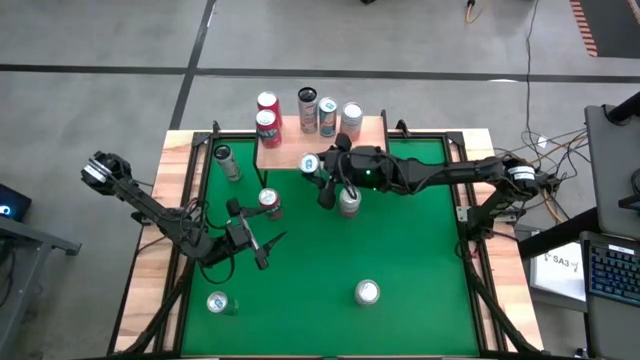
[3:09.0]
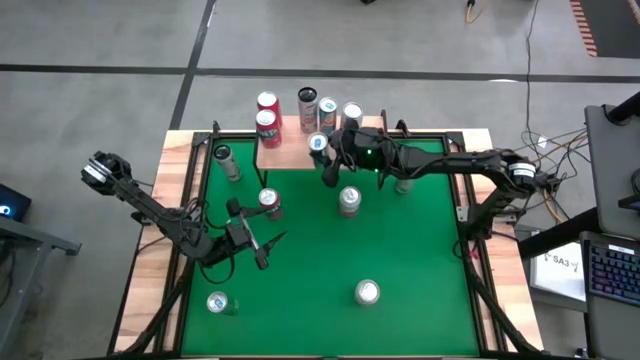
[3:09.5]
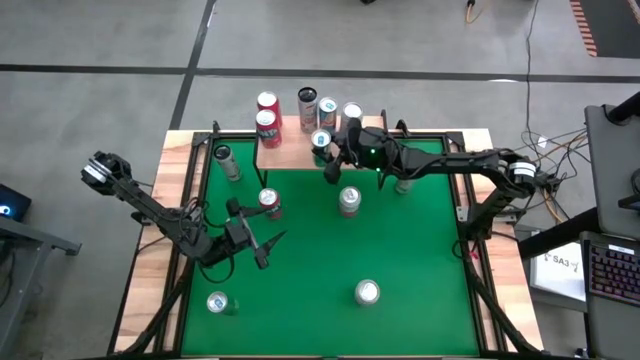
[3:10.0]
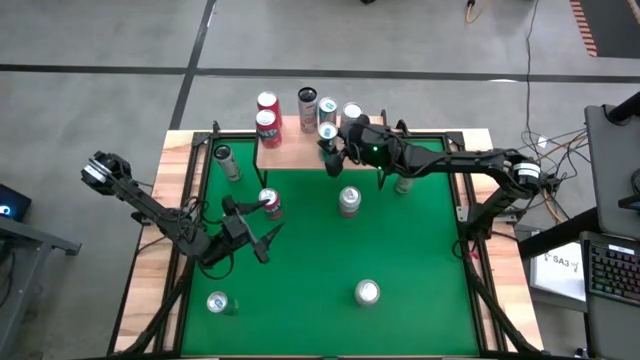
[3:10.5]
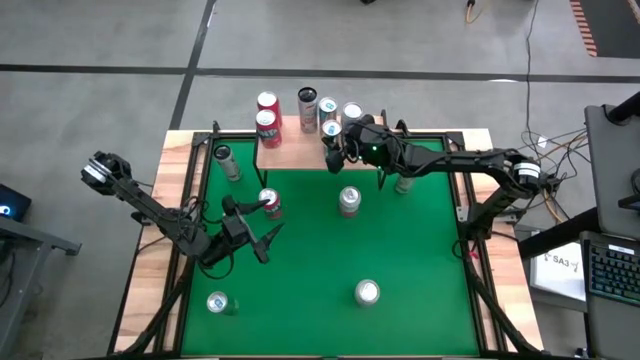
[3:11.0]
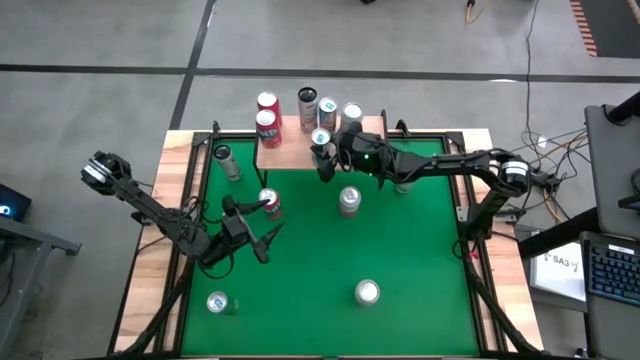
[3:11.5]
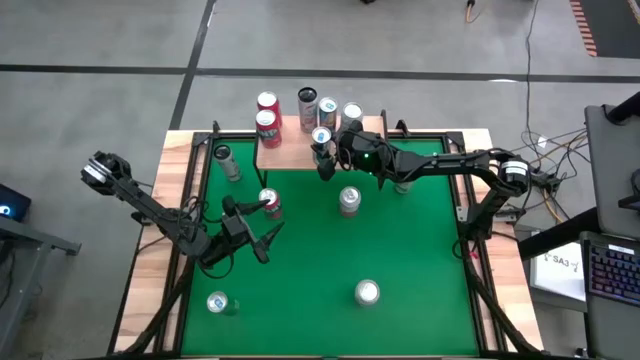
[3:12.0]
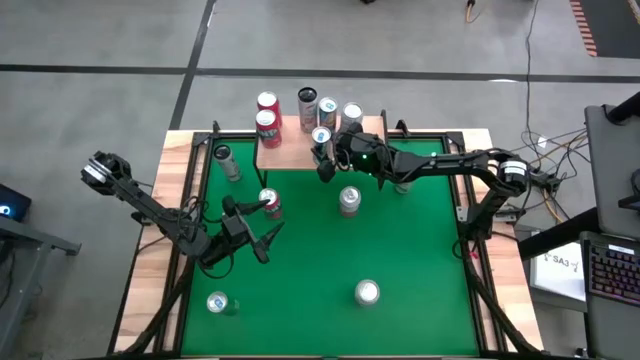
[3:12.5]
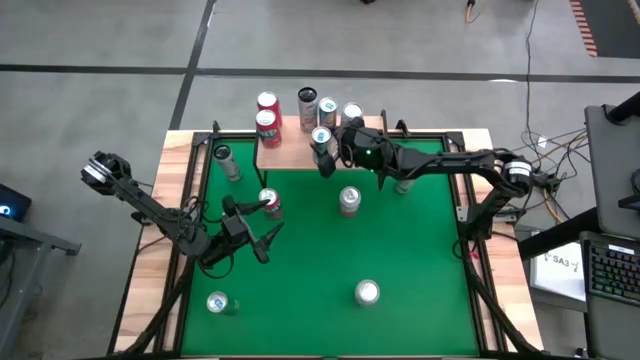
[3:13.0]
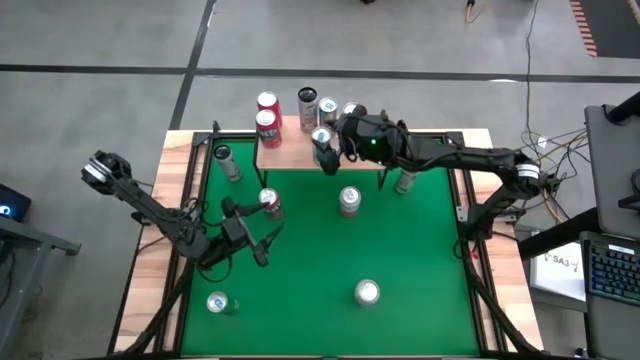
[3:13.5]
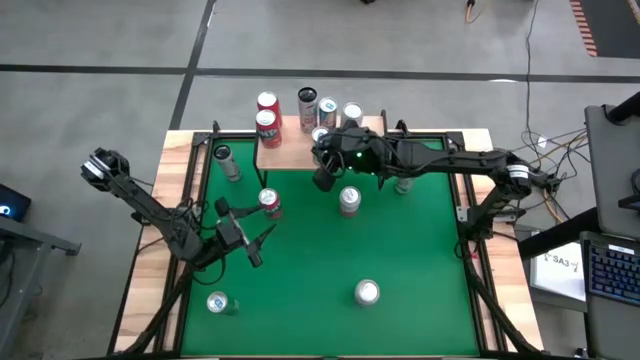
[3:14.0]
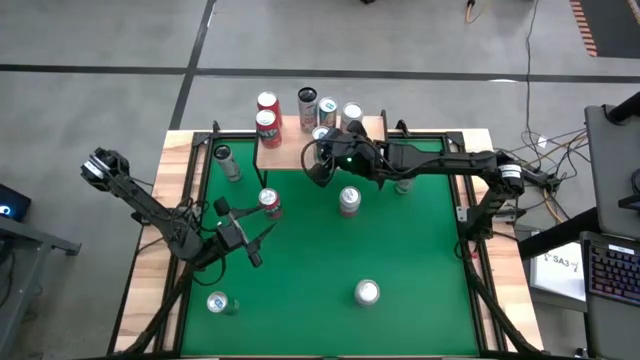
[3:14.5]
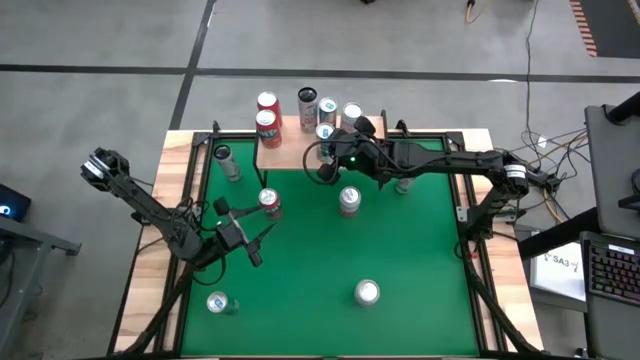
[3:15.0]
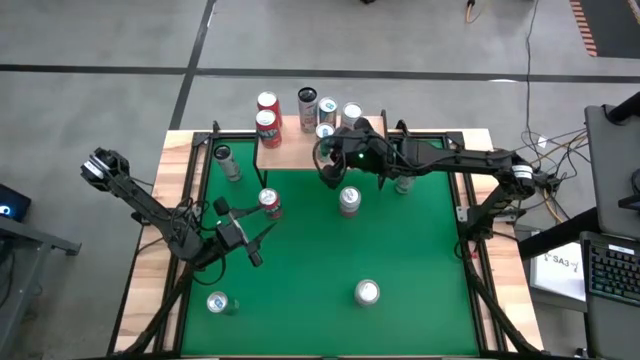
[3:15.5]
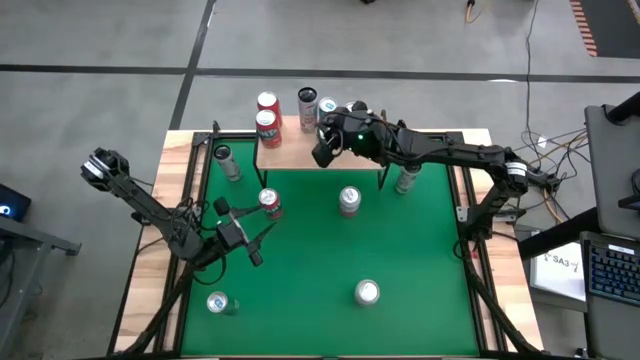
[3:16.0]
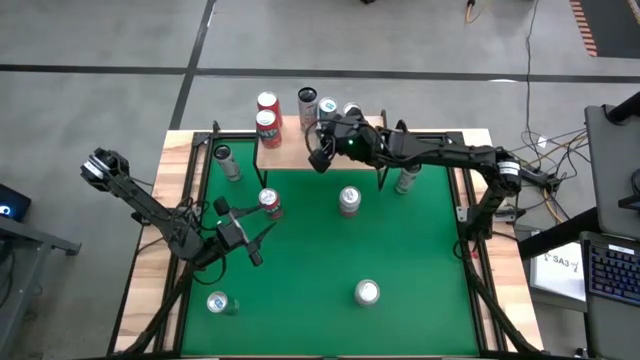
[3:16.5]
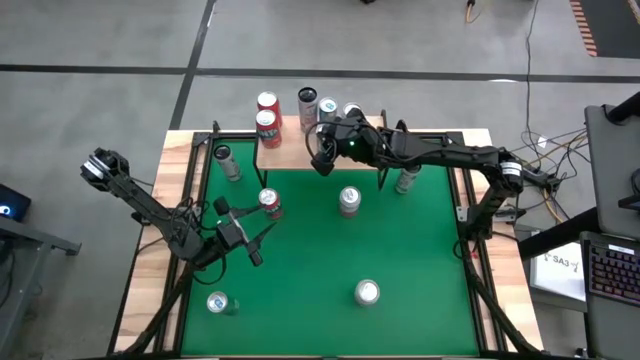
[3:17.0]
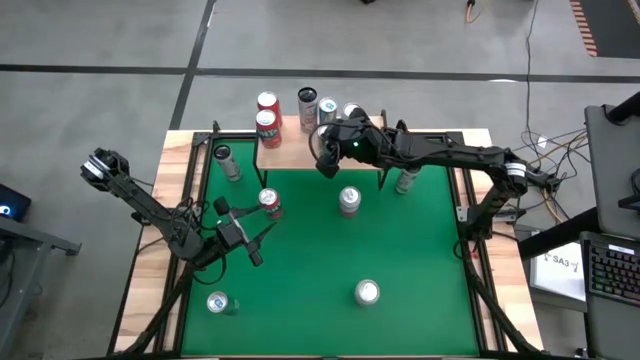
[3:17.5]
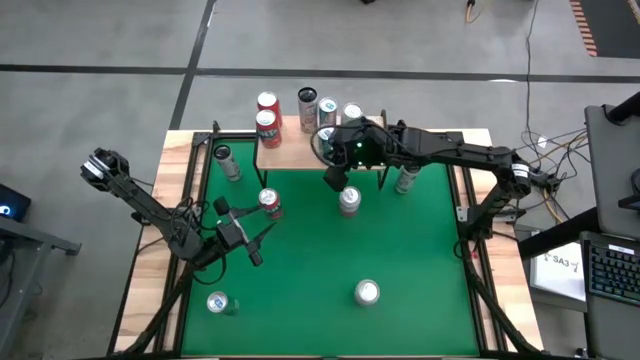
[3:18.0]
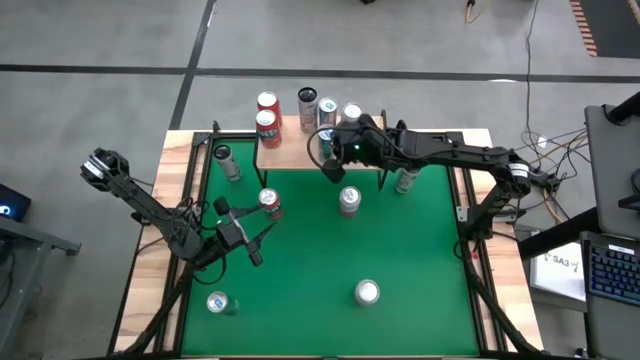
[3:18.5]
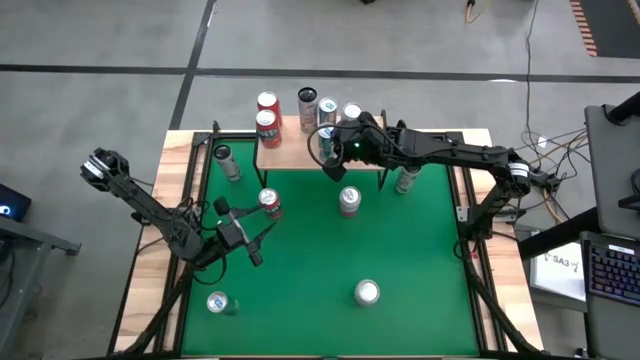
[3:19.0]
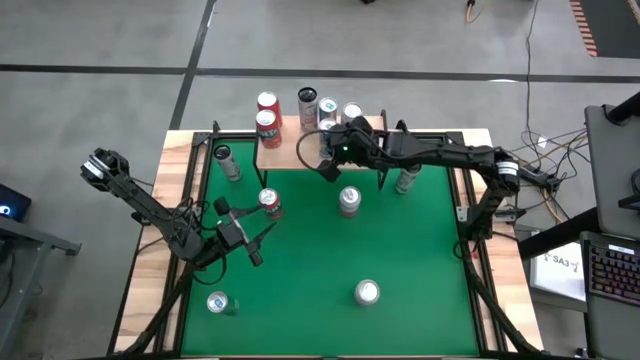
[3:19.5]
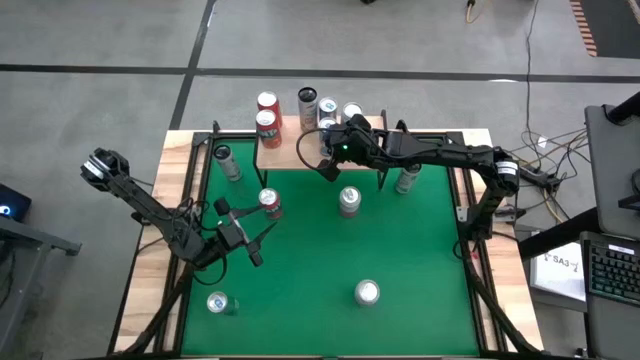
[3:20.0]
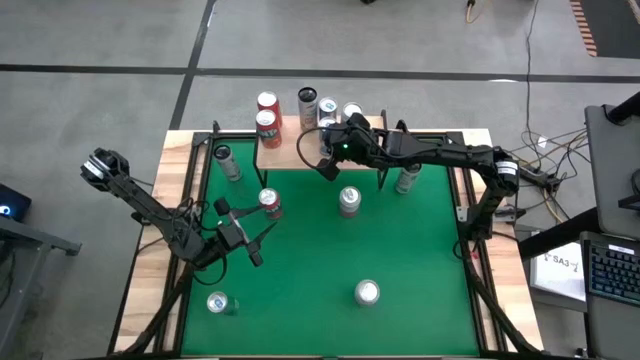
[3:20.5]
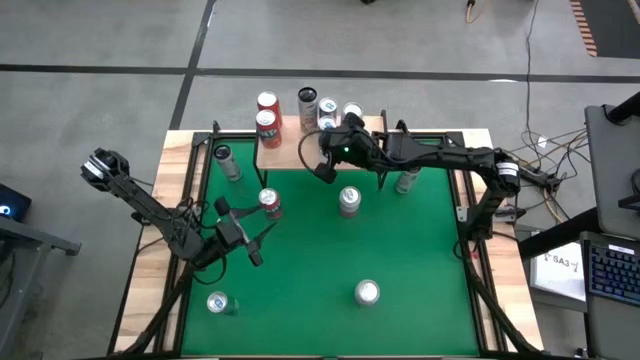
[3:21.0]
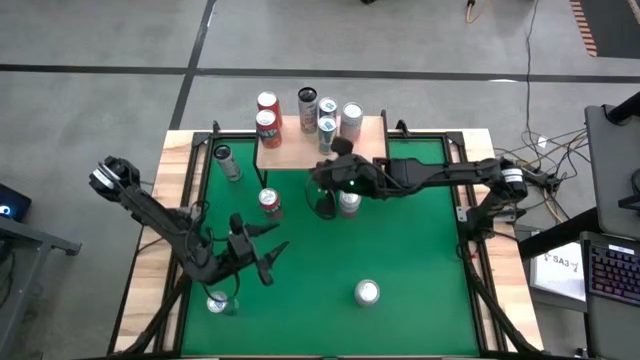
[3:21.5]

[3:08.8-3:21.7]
Task: Place canned beverage on shelf
Put the right blue soda can on the shelf aligned with other blue soda cans

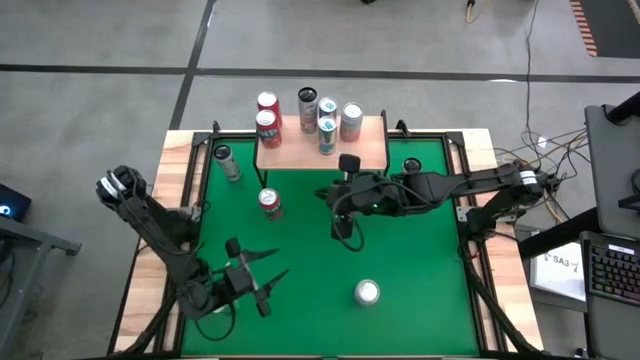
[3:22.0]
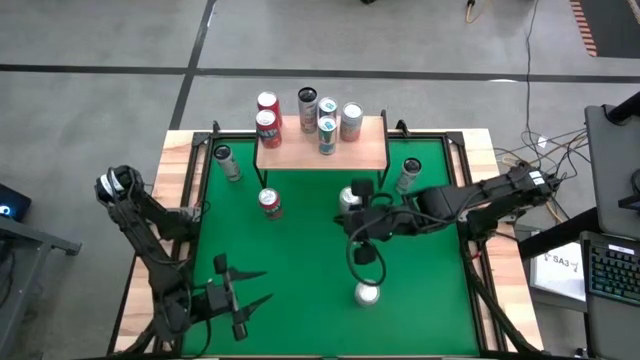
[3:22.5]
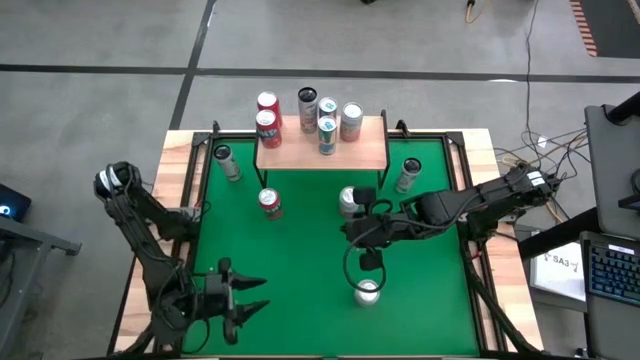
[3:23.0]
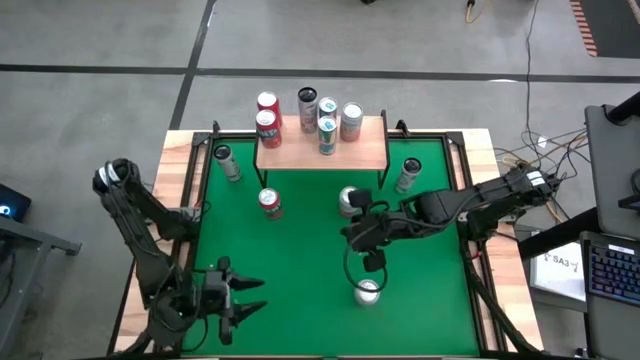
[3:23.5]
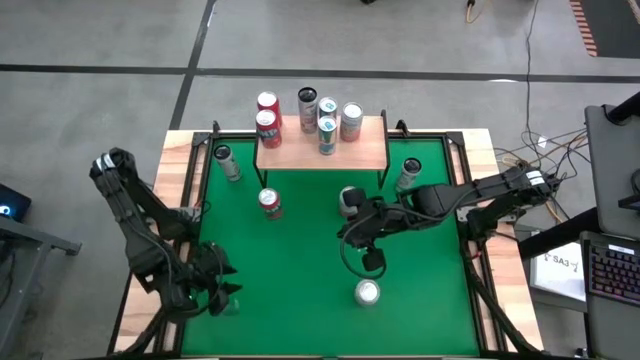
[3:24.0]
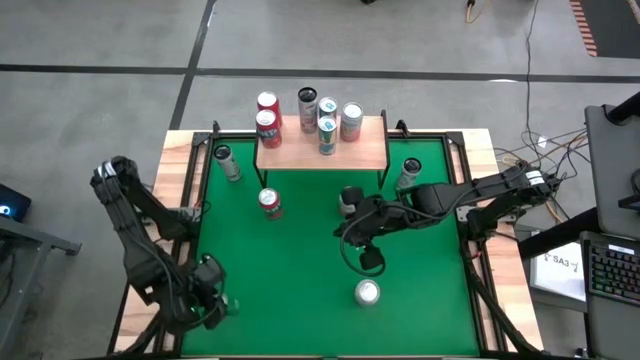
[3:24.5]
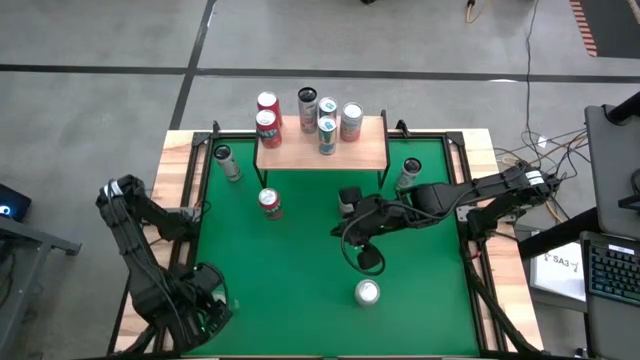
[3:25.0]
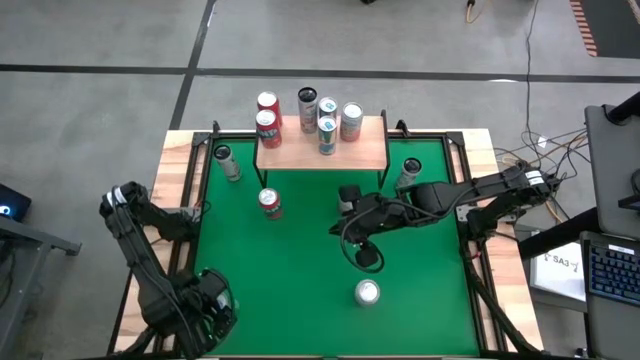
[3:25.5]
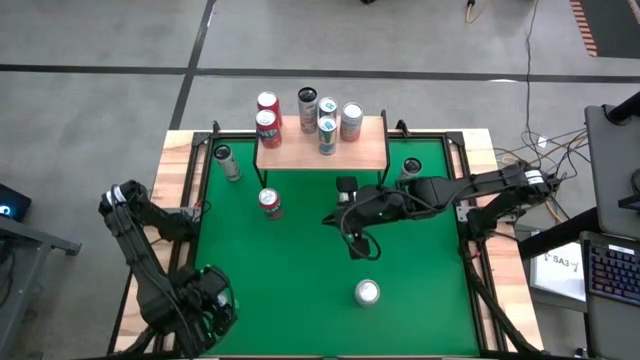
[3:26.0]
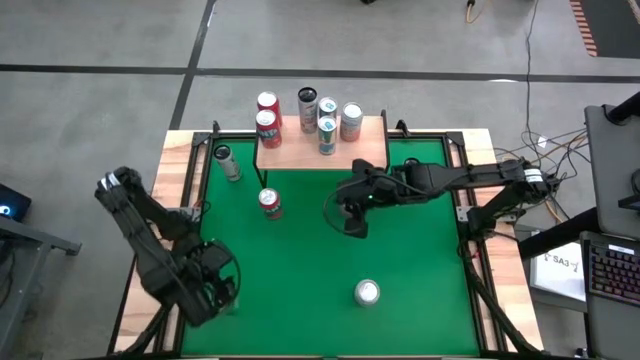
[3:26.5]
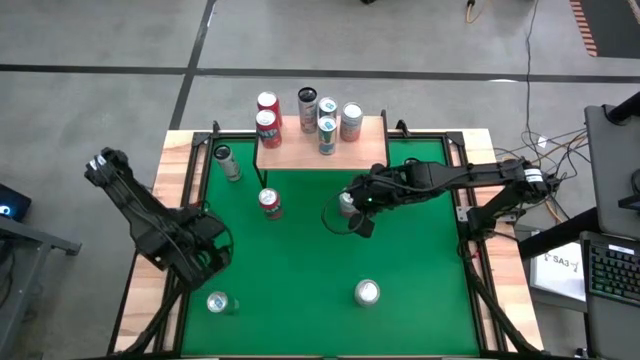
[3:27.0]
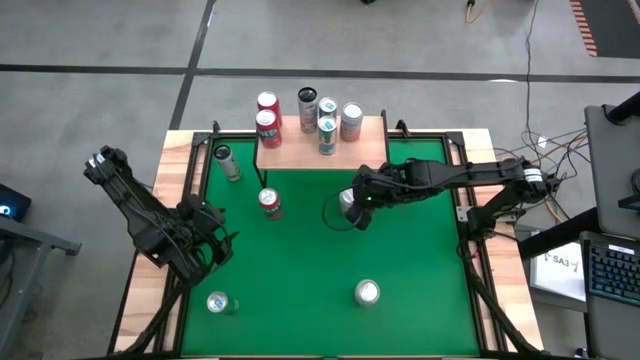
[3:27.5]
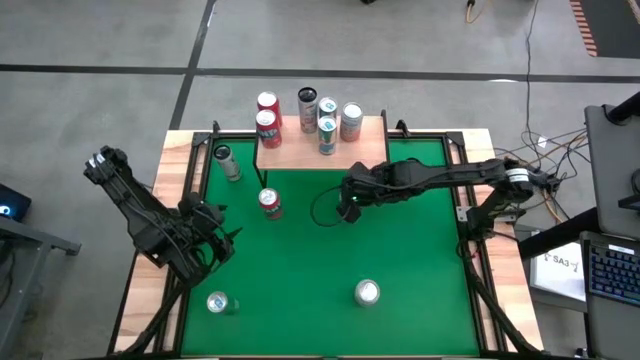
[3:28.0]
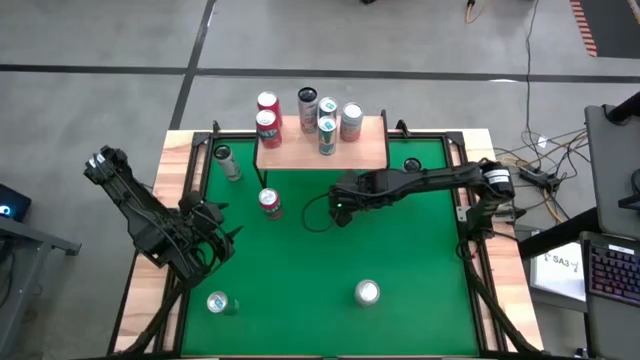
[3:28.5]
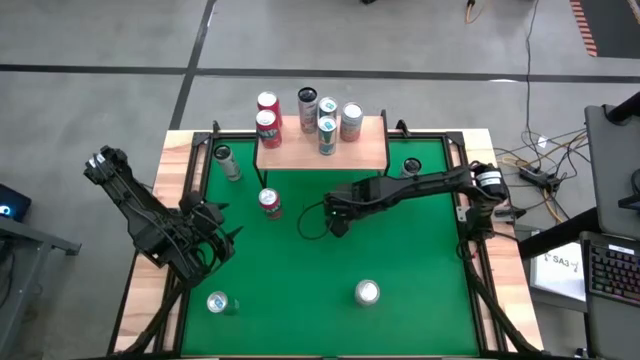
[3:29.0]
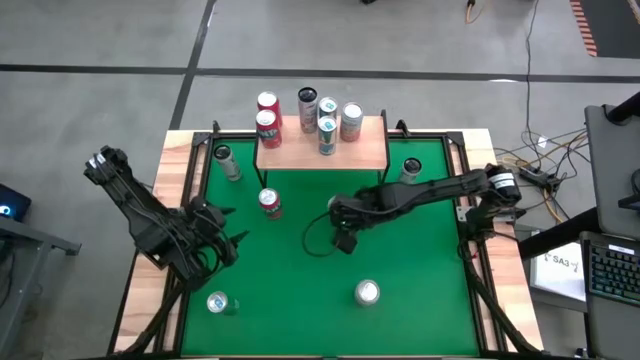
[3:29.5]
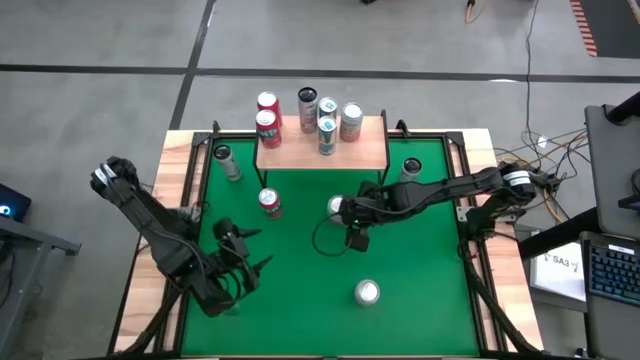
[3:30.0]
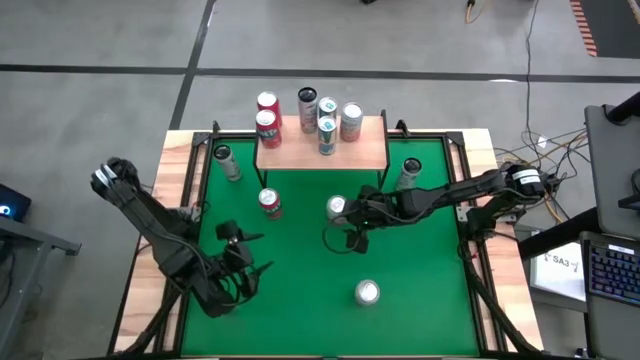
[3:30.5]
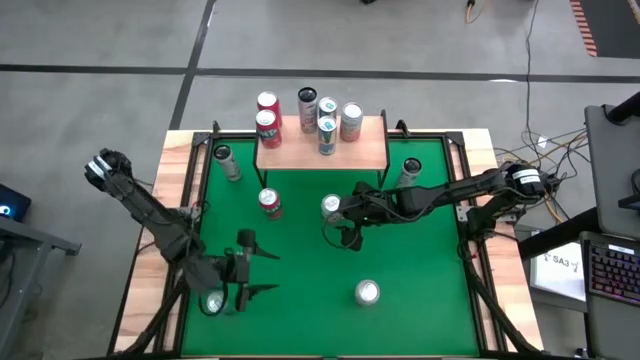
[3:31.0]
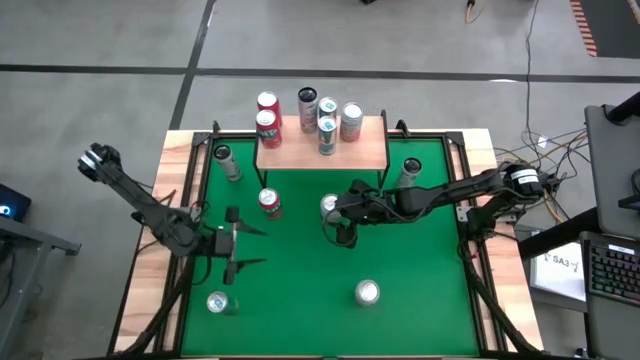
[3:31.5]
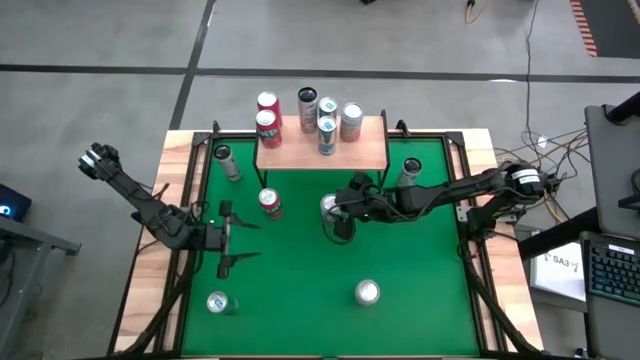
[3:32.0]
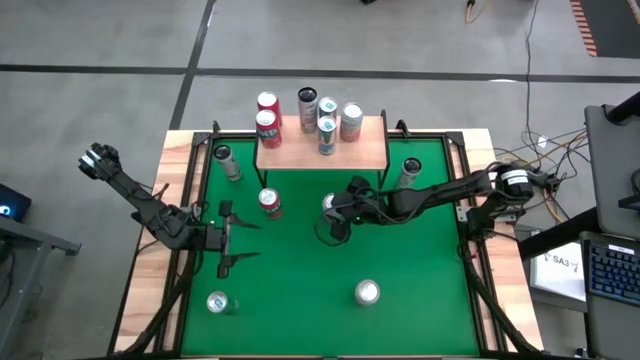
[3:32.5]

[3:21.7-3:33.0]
Put the top white orange soda can on the shelf
